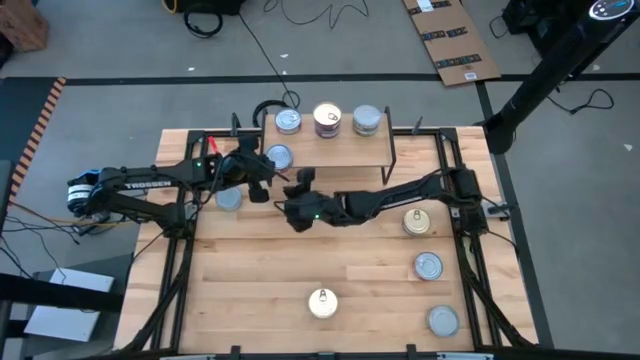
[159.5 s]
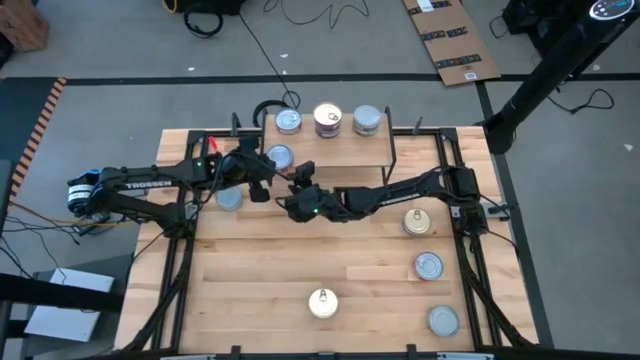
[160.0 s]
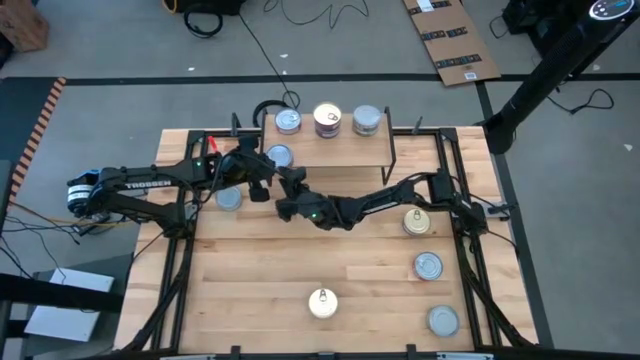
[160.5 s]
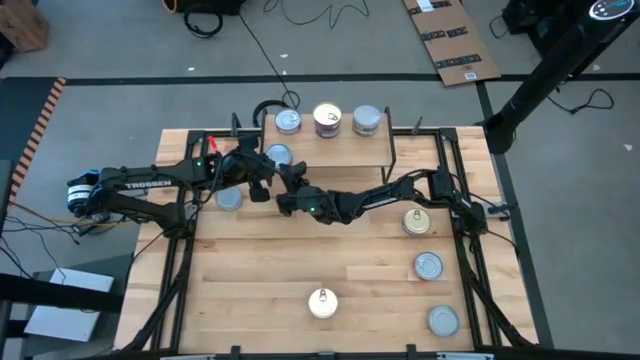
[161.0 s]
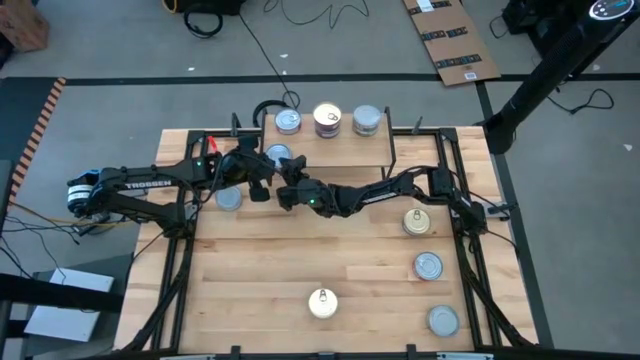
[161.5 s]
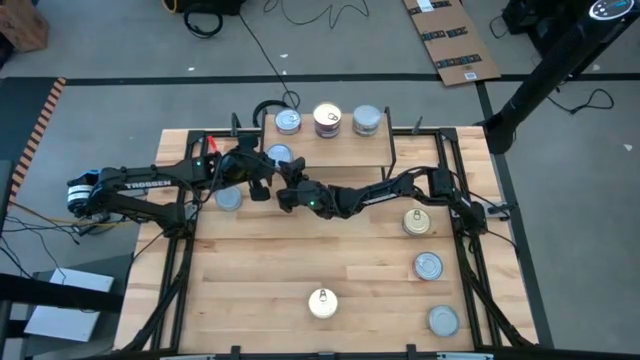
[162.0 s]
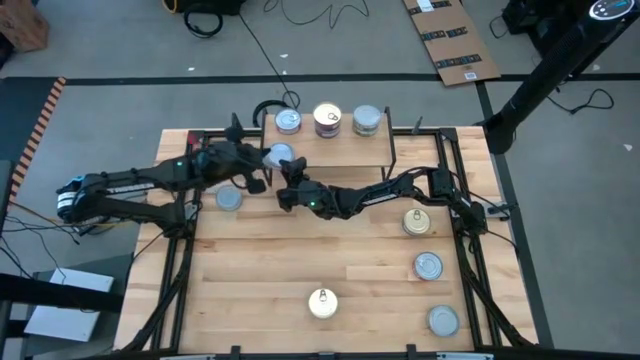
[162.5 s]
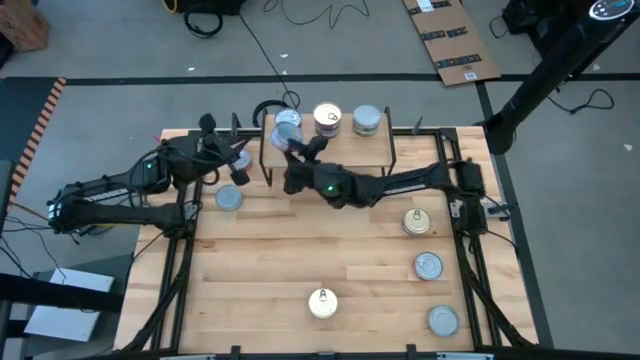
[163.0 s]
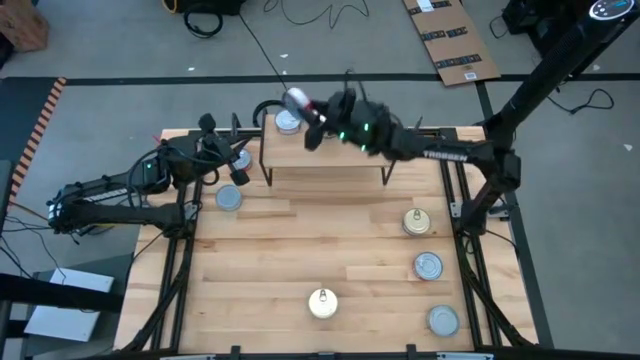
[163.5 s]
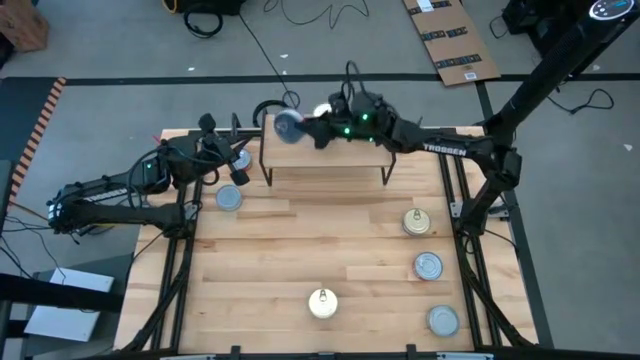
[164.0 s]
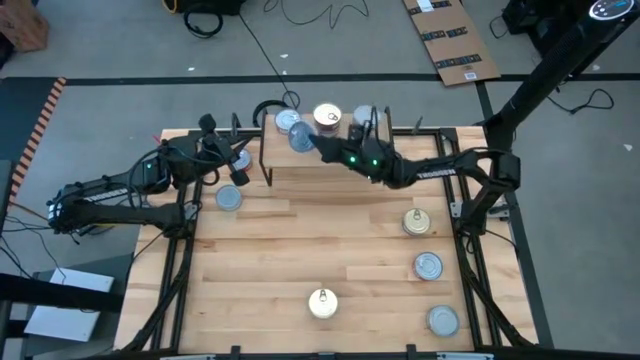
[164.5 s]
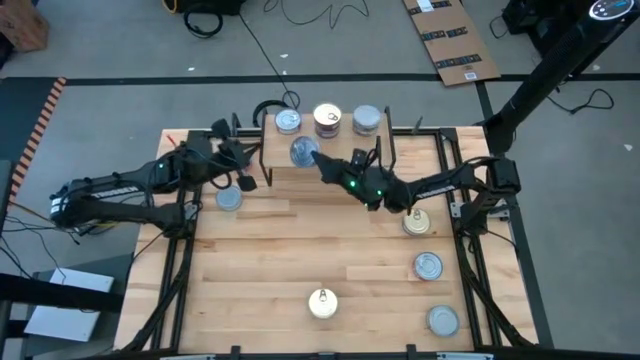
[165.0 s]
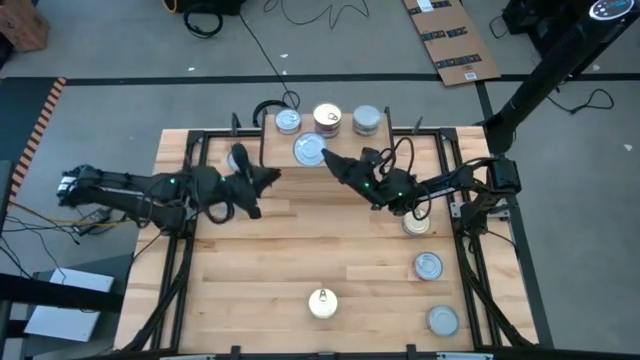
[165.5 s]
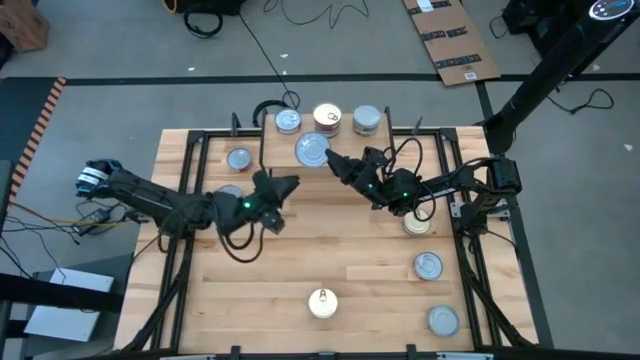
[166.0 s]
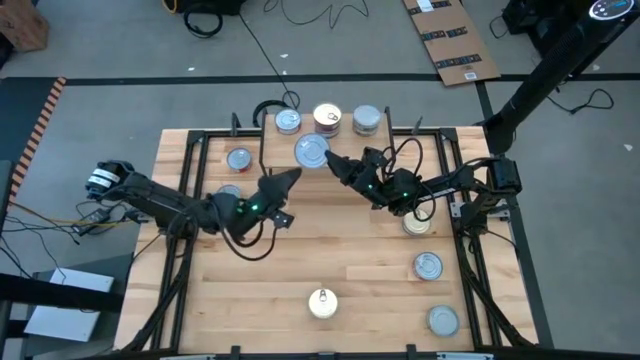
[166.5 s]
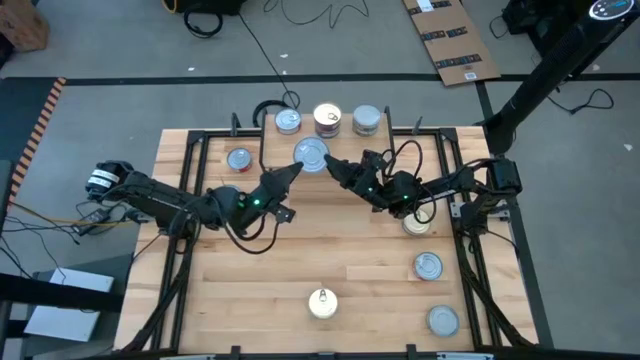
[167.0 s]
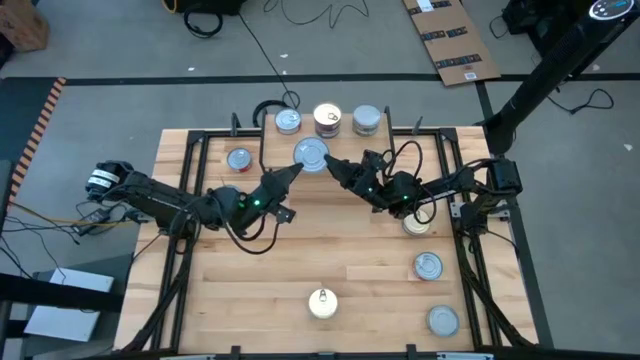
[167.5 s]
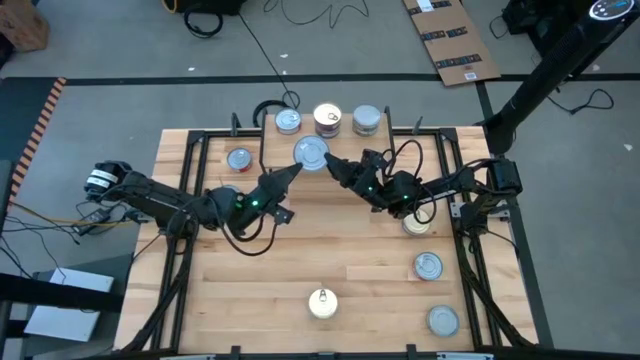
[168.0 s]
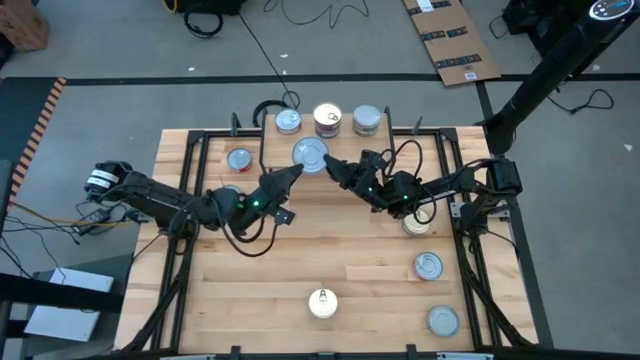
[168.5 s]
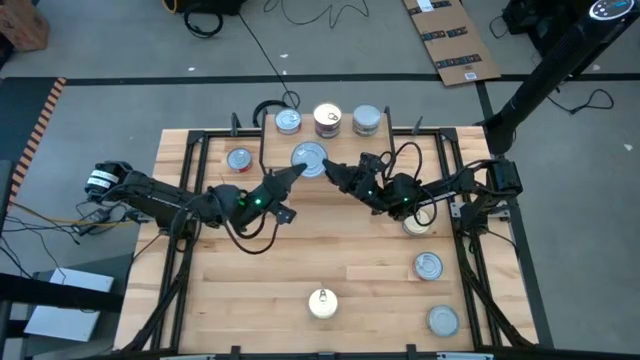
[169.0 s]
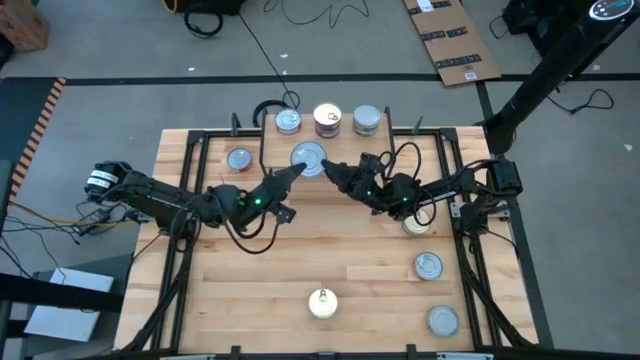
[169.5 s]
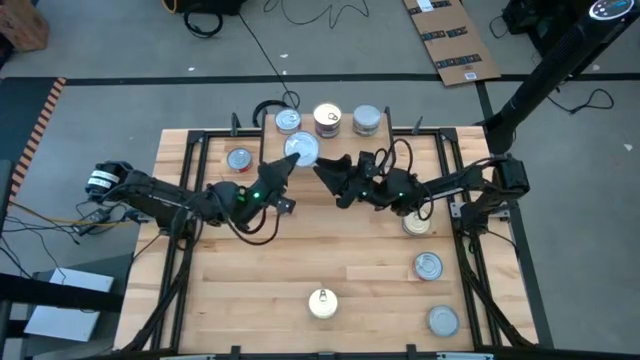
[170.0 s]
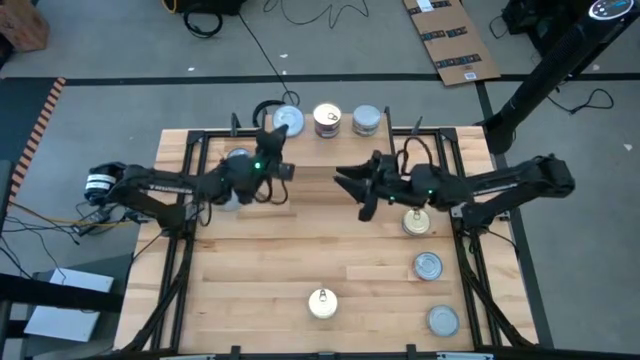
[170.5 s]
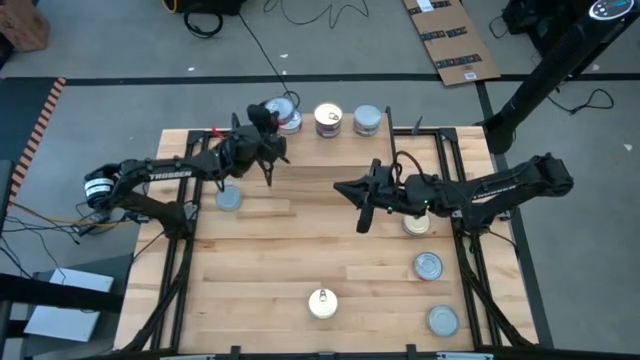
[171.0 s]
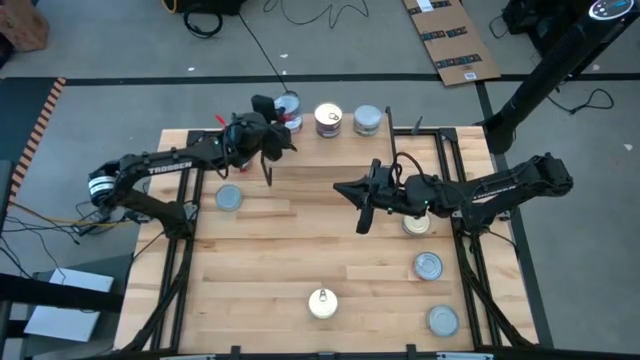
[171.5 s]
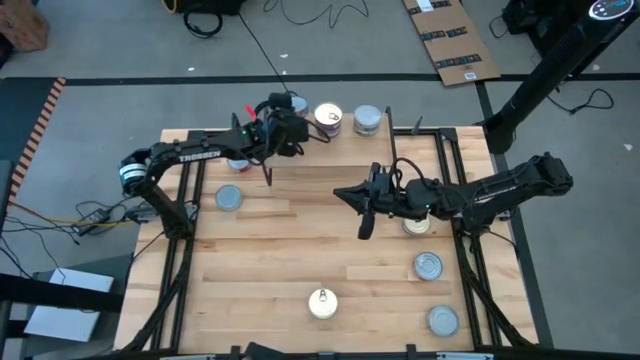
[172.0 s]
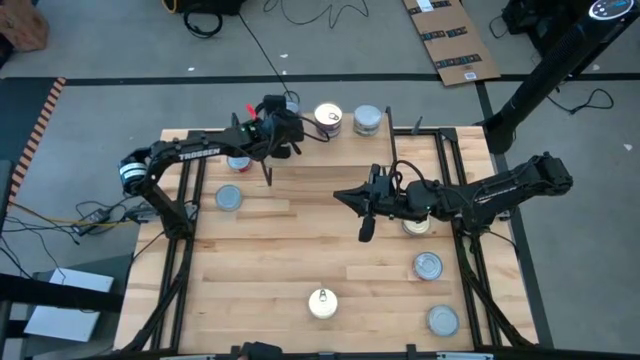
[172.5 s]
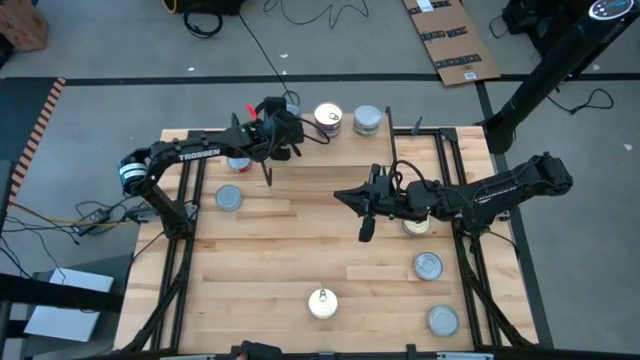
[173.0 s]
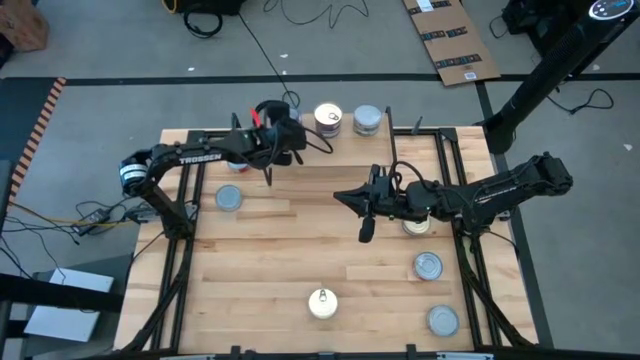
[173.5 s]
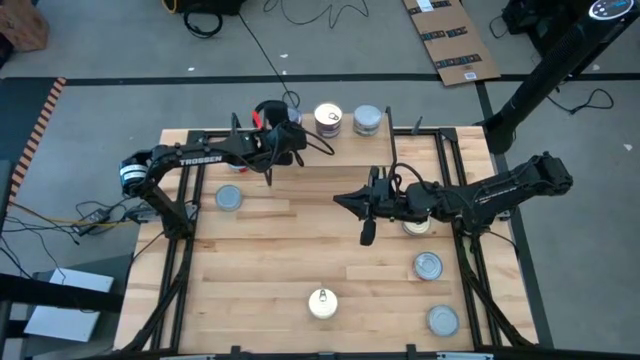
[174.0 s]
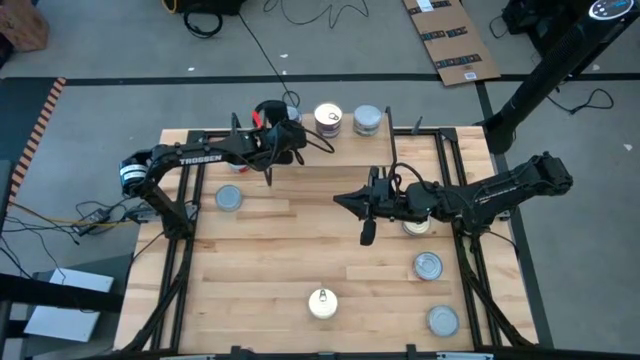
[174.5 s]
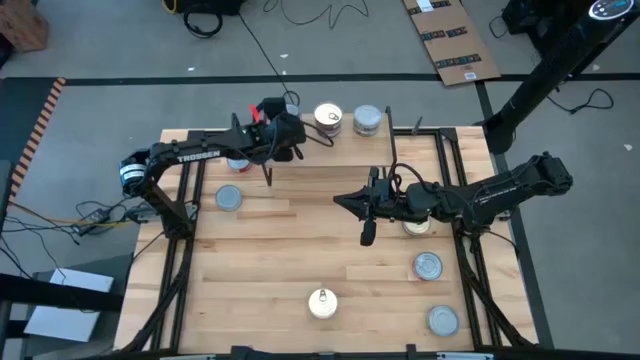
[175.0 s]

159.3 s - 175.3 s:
Task: Stack canned seafood by type on shelf
Stack the red tuna can on top of the red tuna can on the shelf

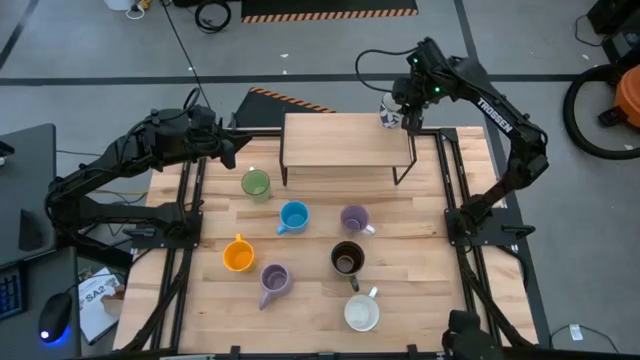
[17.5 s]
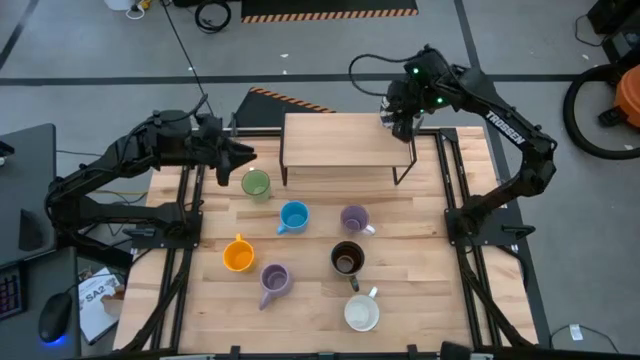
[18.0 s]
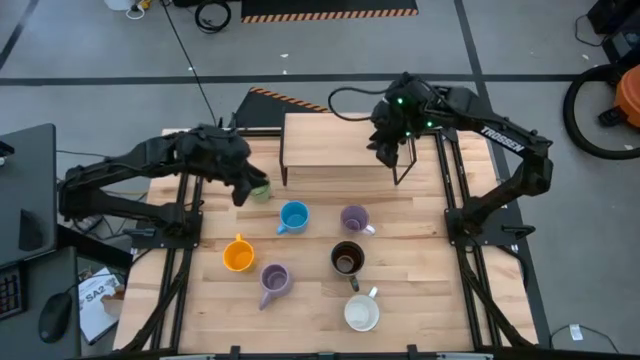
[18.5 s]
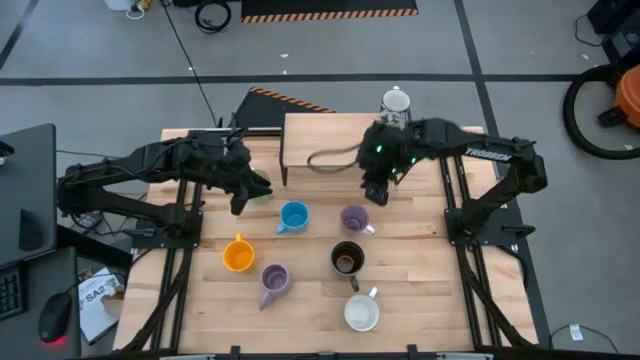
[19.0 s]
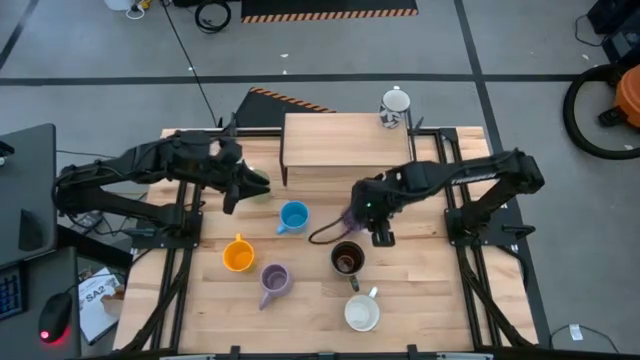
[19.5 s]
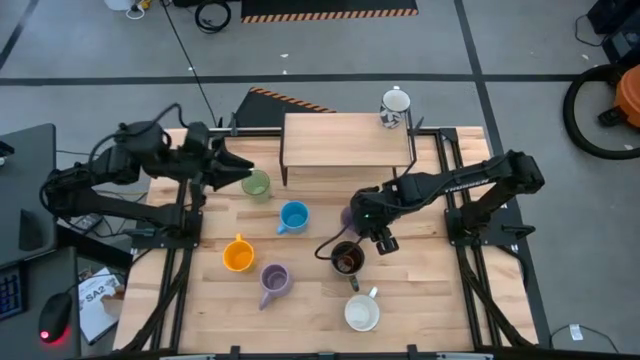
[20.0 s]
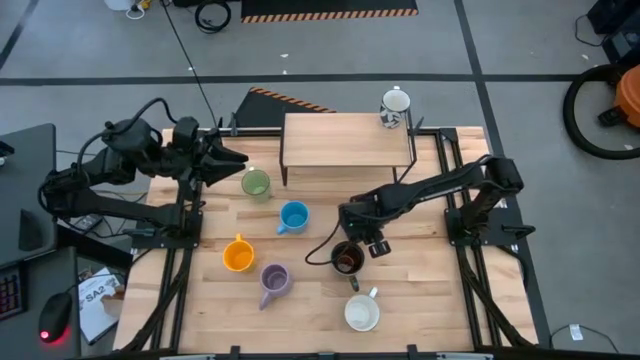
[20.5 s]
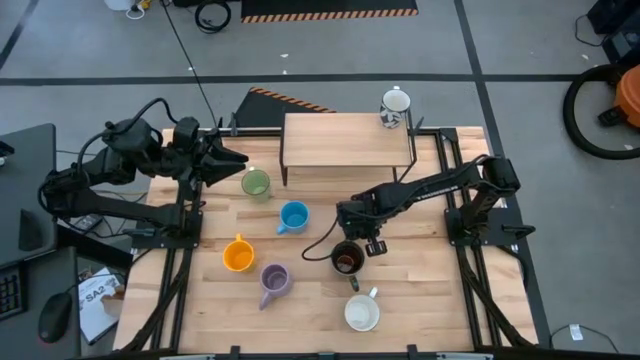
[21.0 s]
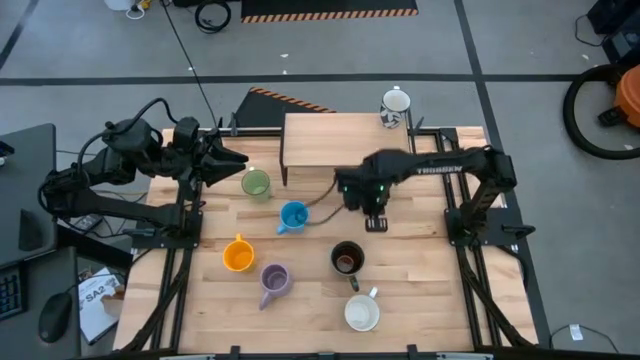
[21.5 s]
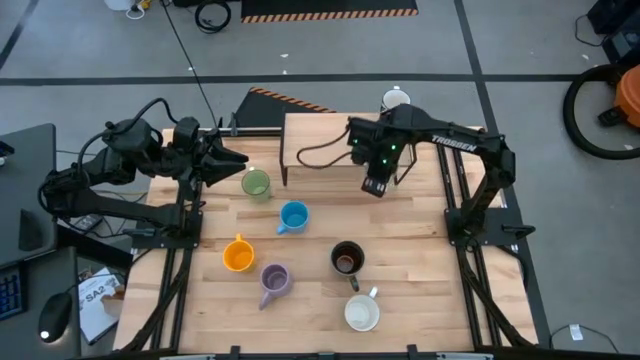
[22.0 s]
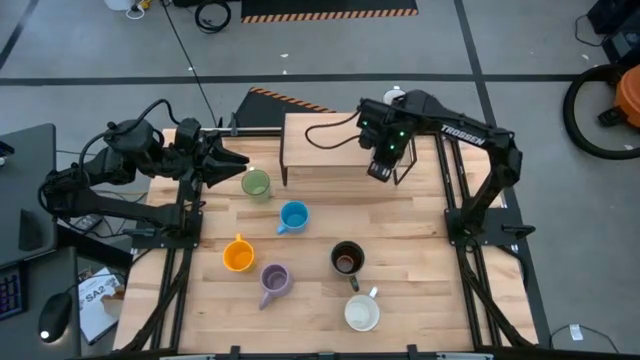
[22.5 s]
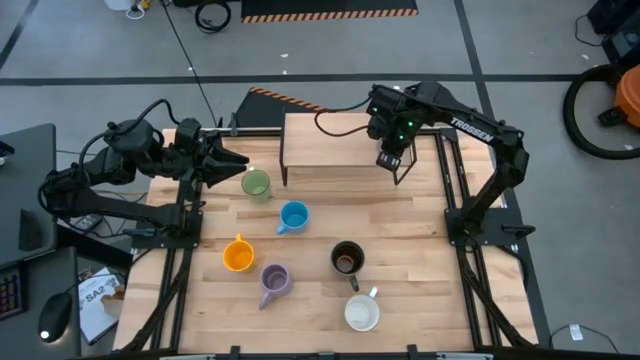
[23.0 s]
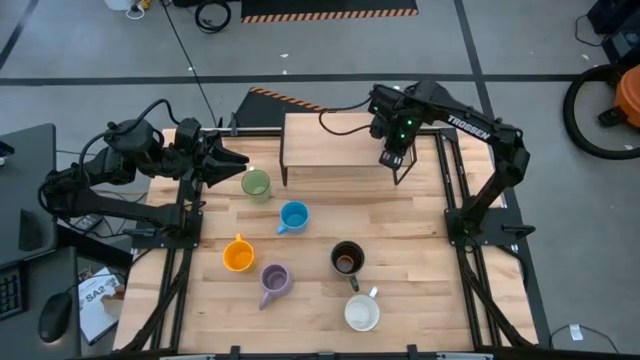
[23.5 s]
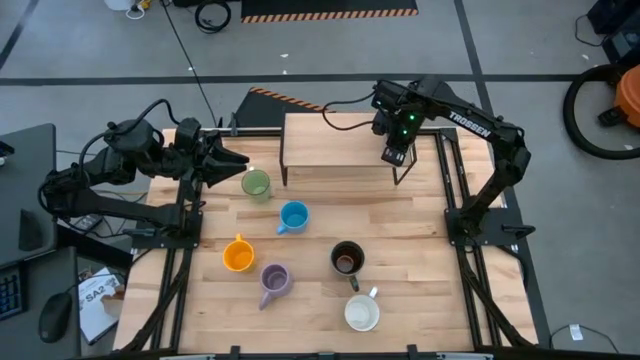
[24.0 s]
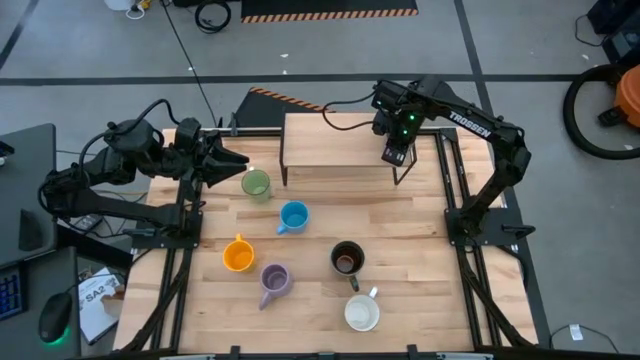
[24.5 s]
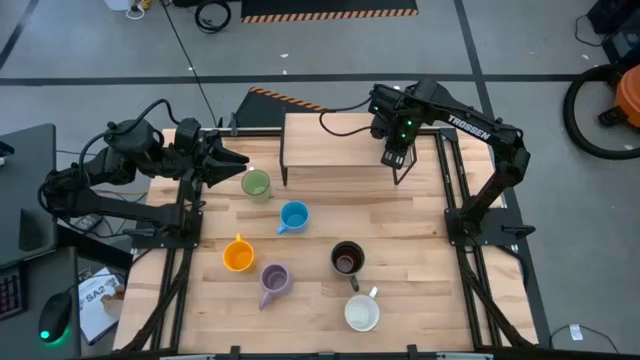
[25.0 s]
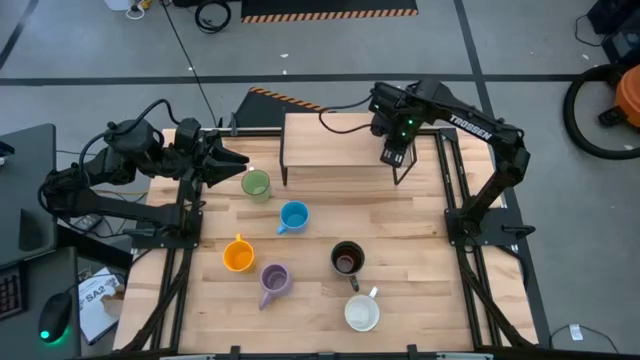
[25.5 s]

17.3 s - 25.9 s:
Task: Place coffee mugs
Put the top purple mug on the shelf
